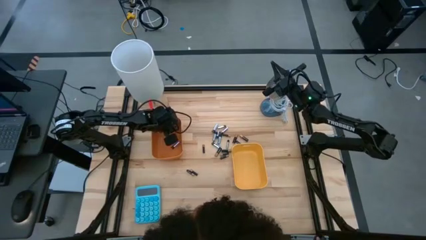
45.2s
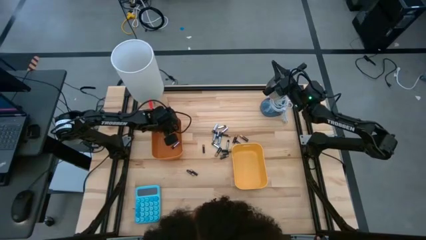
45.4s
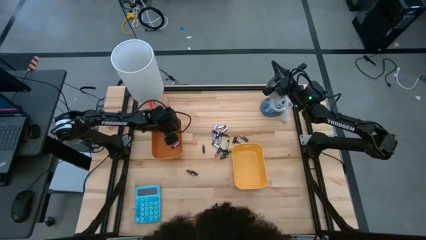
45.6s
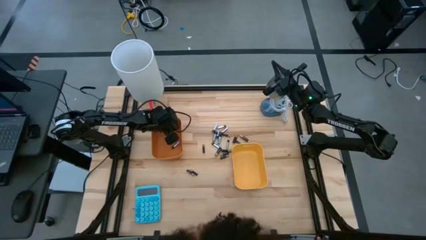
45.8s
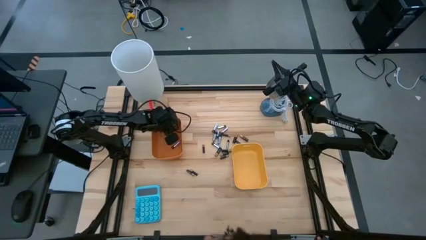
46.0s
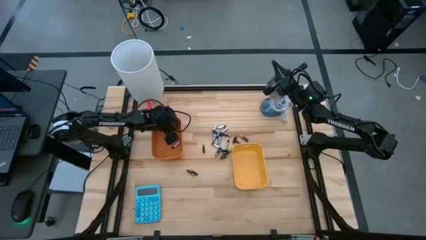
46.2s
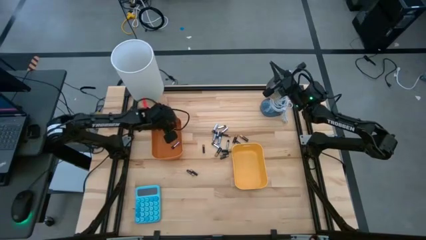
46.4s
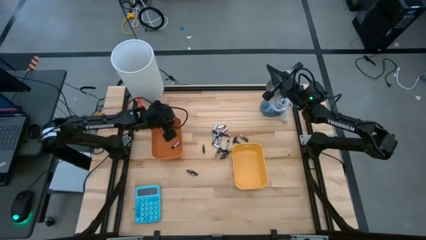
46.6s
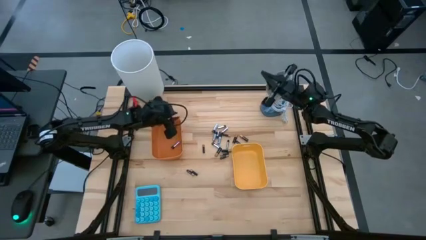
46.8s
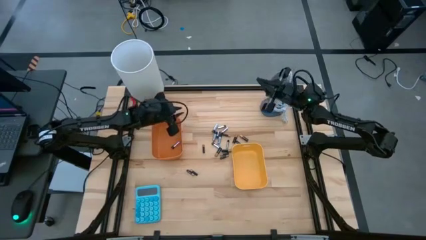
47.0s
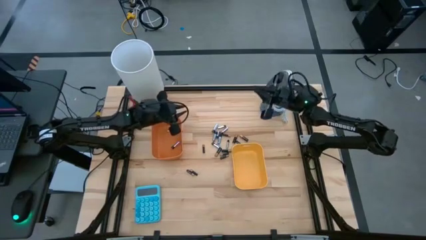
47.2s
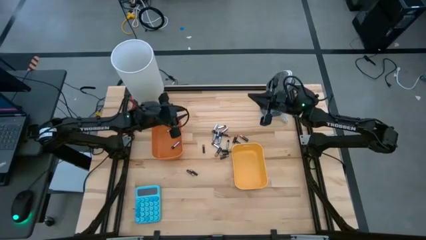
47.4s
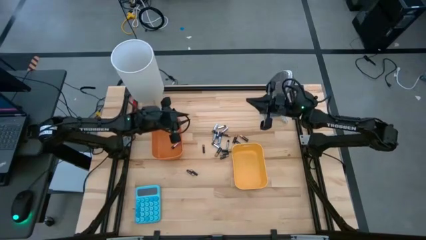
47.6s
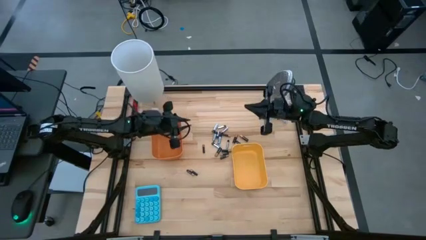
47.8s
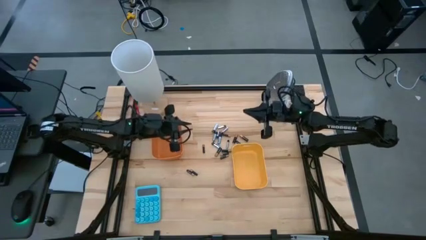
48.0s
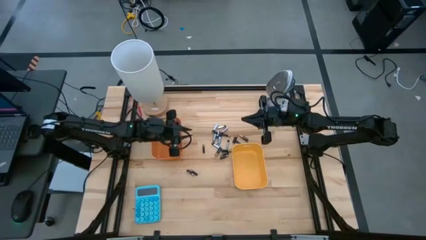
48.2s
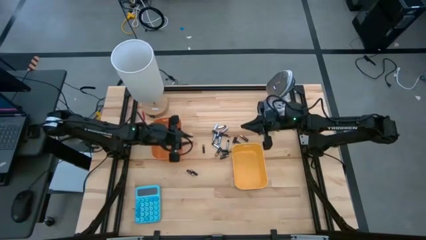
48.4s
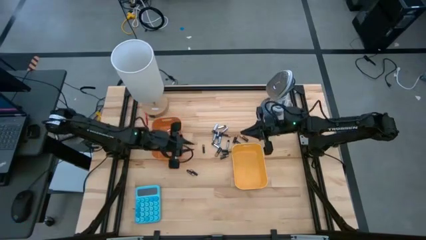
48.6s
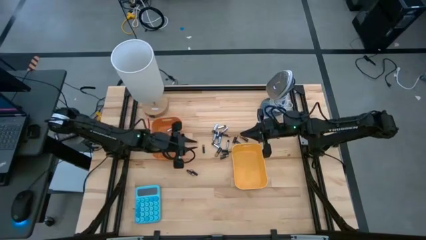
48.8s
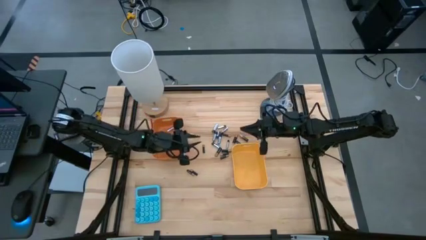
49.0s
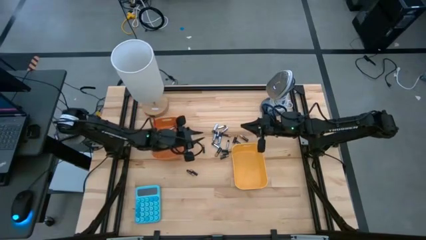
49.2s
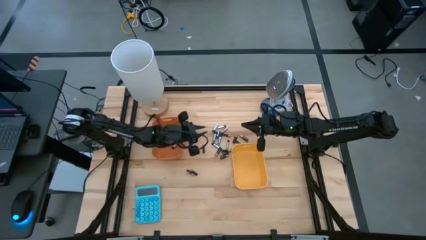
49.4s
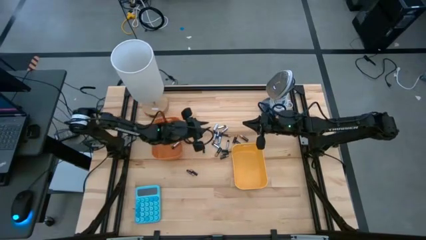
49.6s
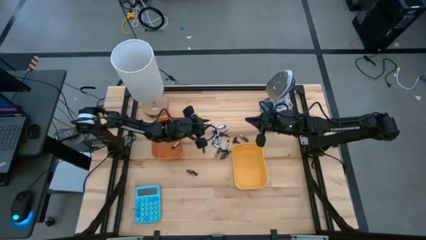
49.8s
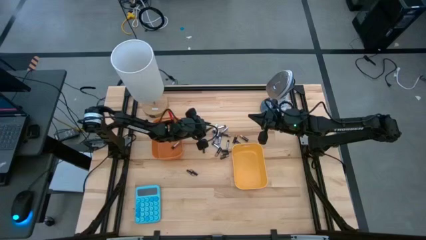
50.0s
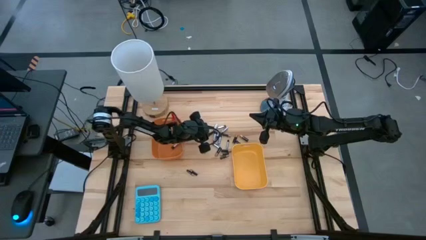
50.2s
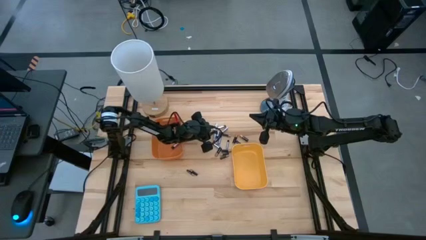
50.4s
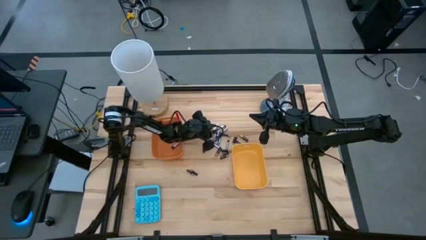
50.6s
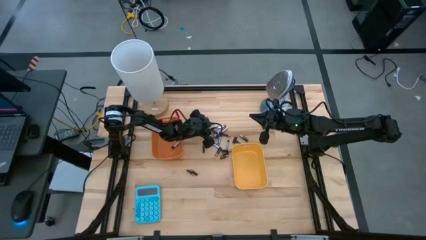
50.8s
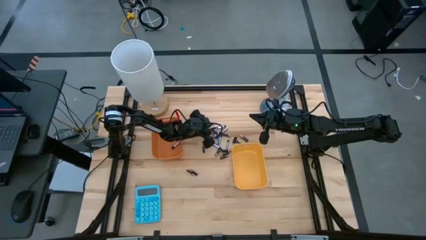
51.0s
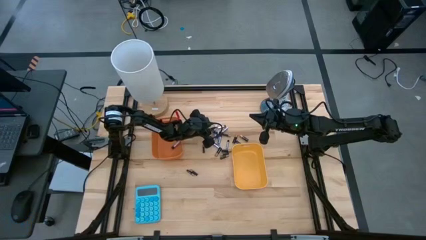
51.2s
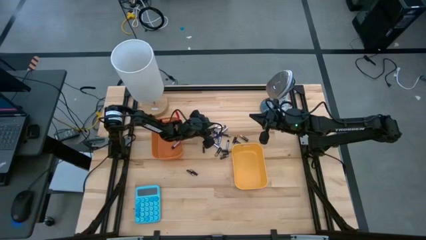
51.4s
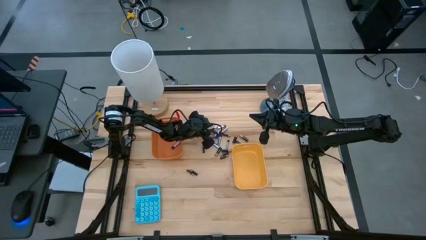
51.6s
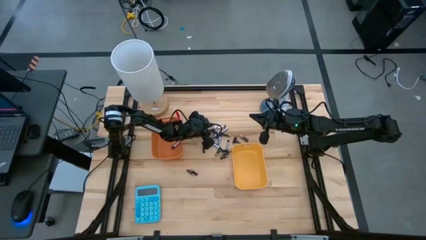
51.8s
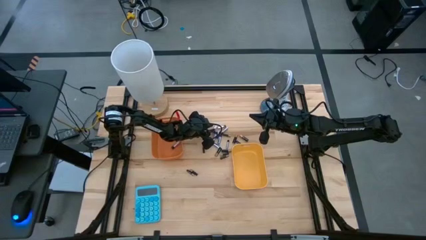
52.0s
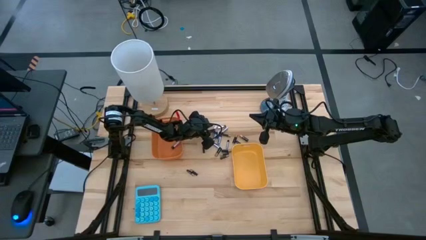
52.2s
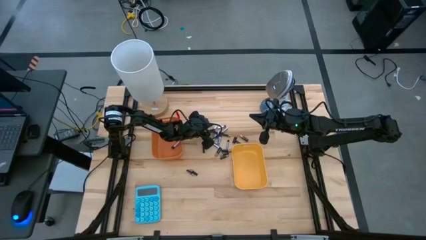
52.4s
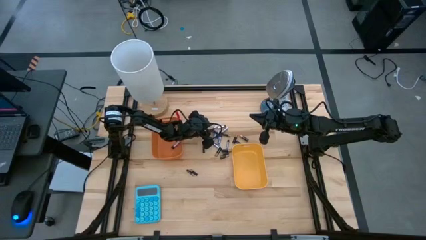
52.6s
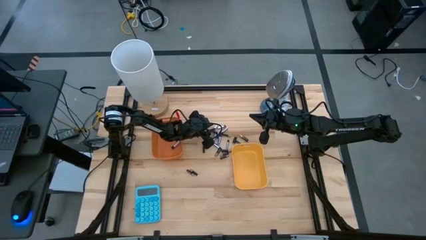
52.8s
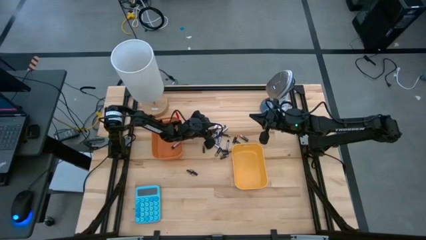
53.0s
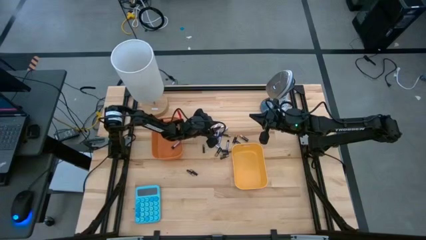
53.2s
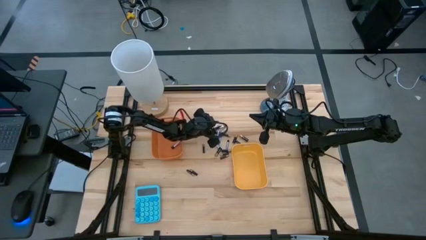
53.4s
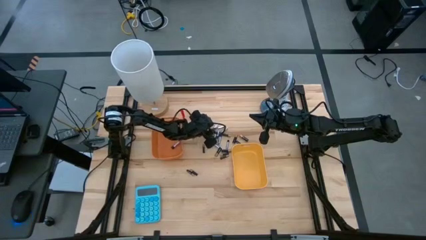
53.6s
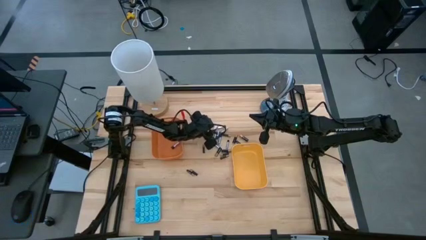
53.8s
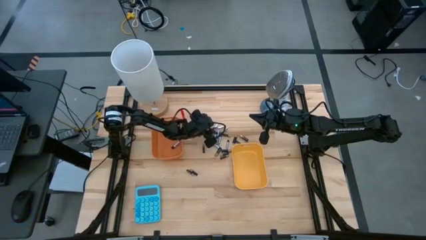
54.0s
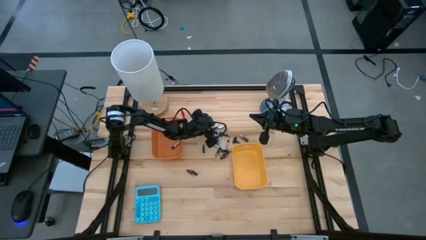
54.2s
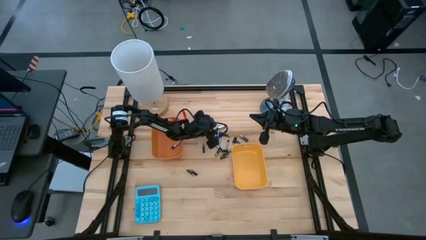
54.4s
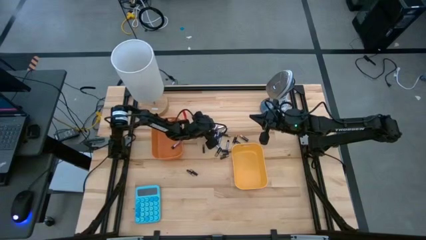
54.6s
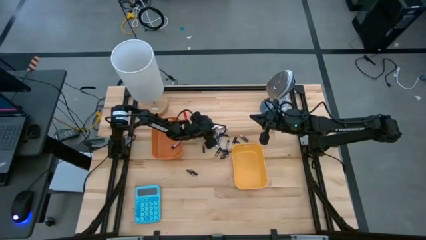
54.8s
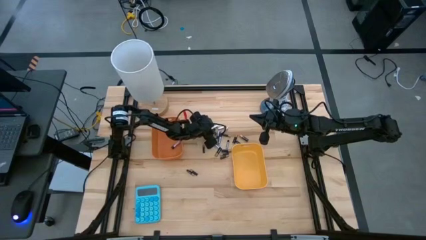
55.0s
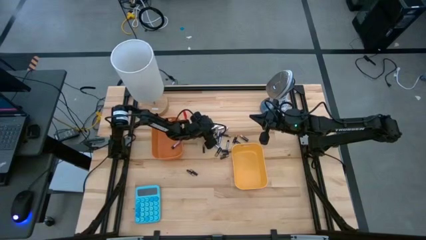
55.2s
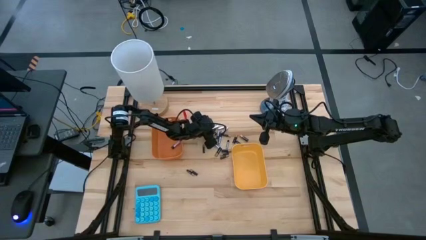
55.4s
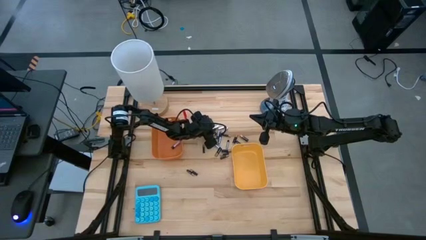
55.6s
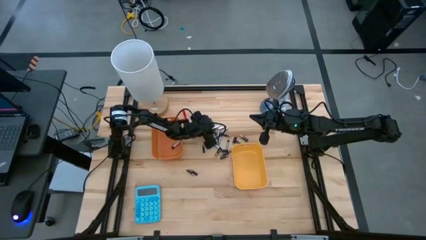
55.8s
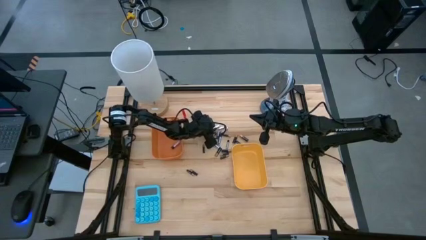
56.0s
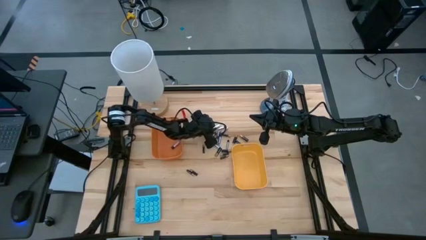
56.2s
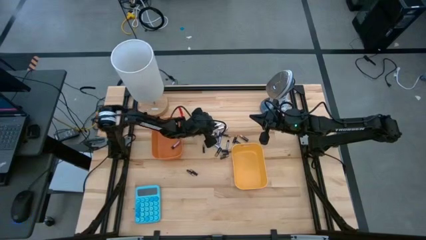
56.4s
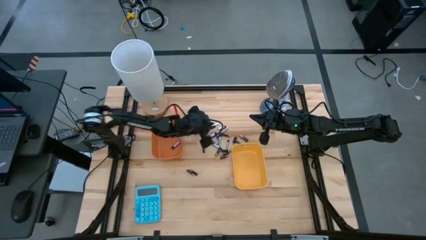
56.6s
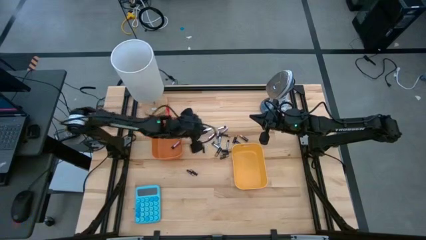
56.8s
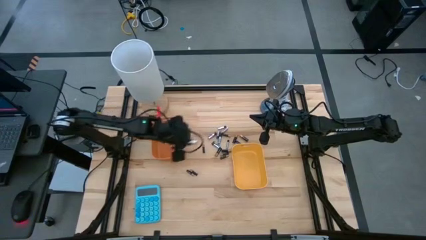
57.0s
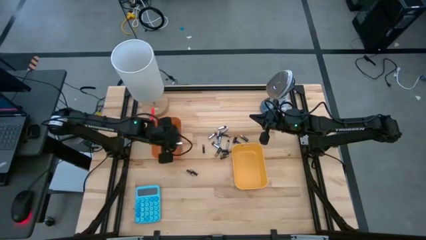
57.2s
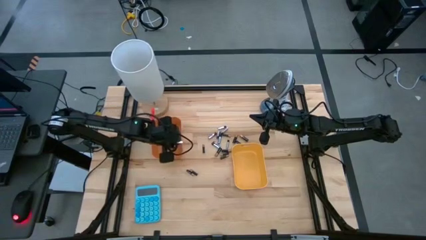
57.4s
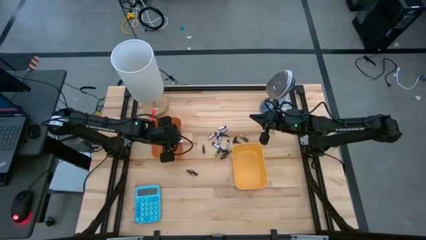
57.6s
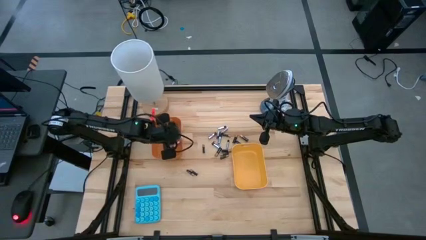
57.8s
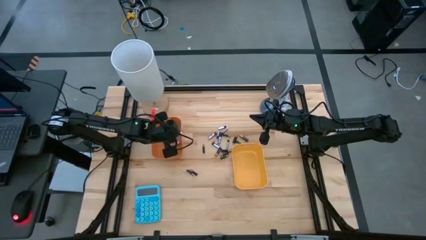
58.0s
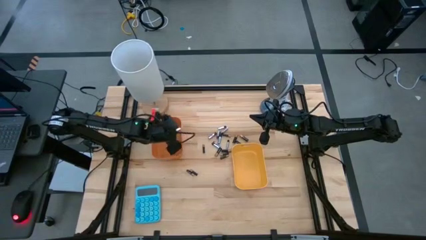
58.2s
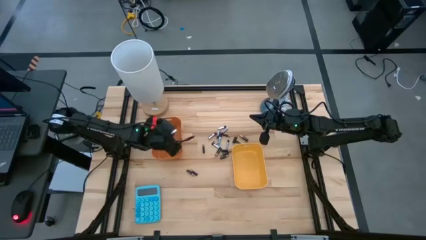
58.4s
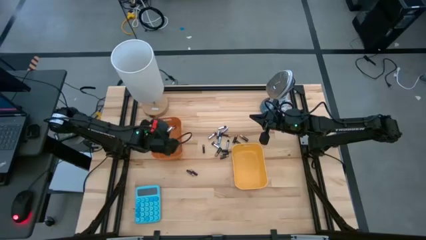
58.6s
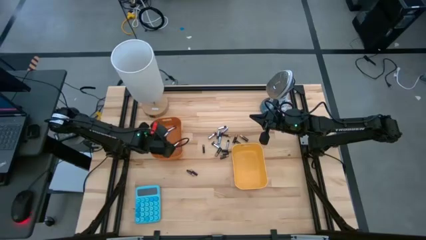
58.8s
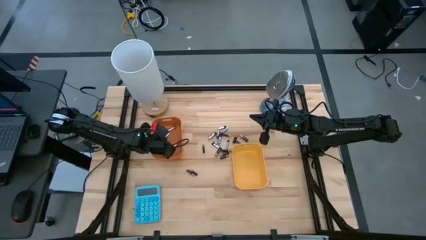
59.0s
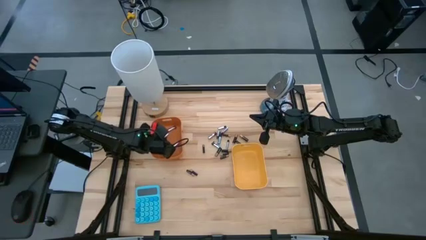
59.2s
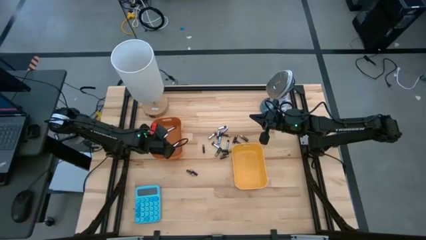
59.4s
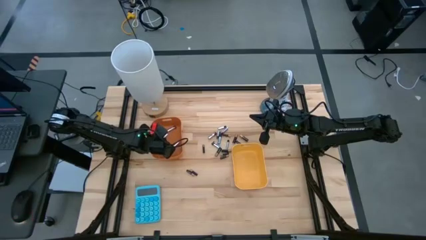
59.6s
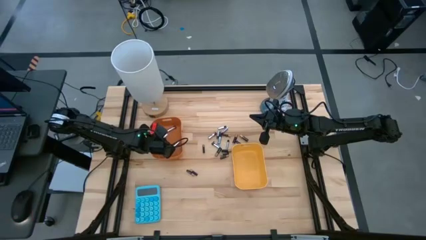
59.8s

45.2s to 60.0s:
Task: Sort batteries
Put the silver battery into the orange bin

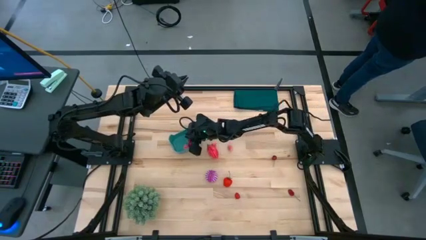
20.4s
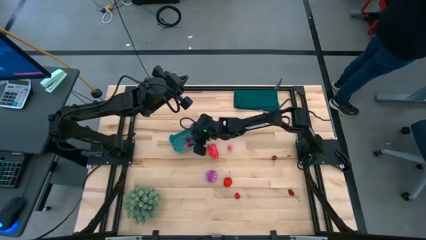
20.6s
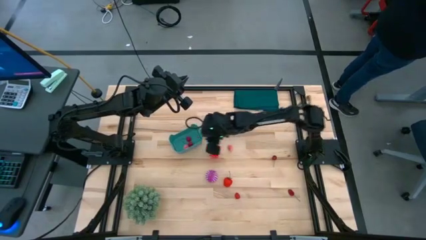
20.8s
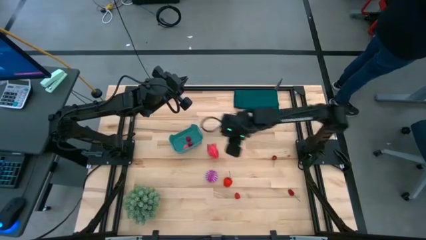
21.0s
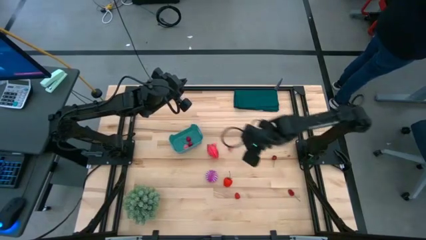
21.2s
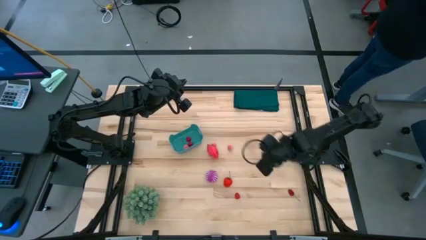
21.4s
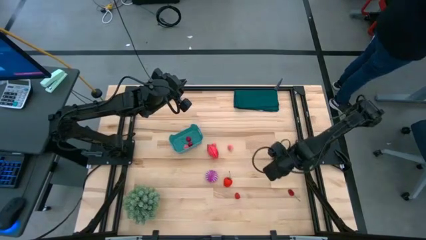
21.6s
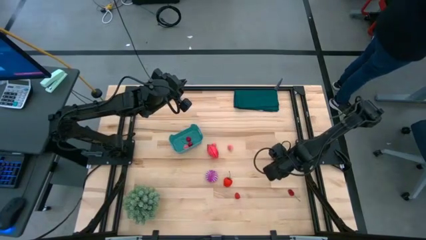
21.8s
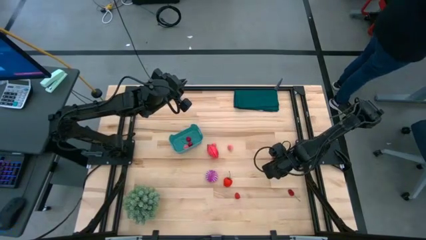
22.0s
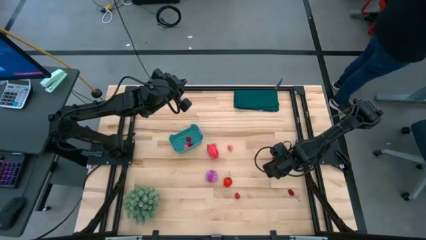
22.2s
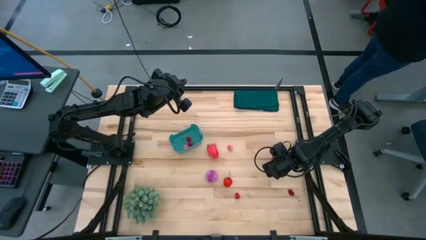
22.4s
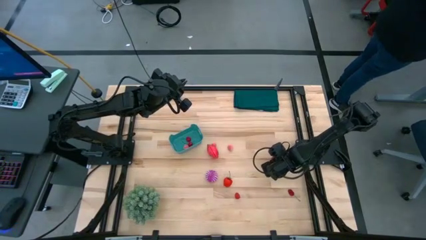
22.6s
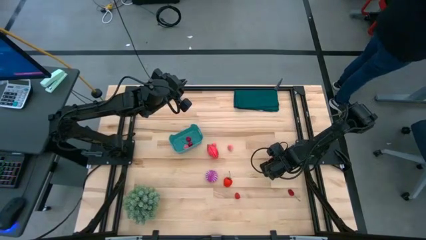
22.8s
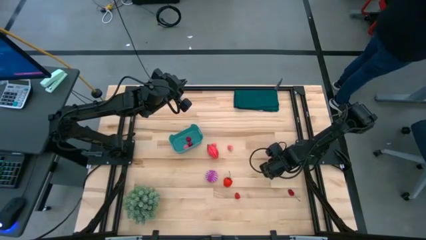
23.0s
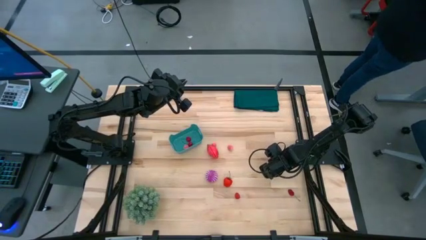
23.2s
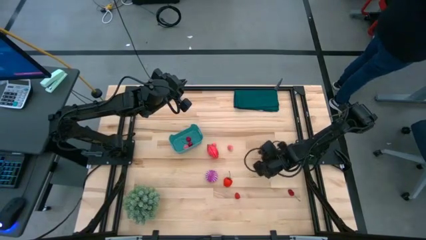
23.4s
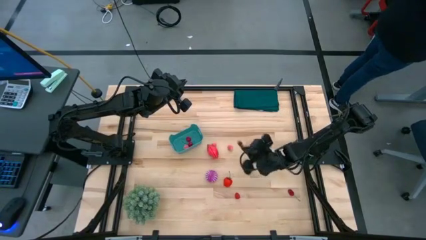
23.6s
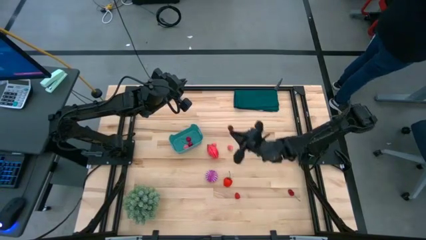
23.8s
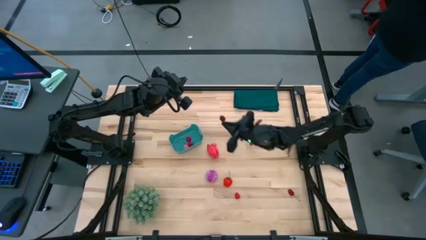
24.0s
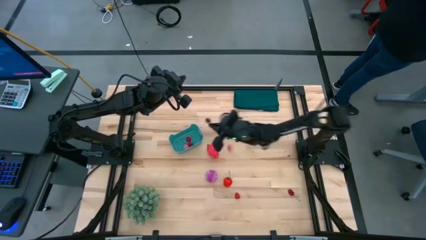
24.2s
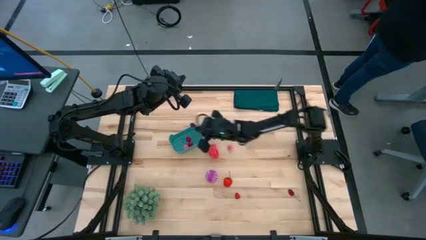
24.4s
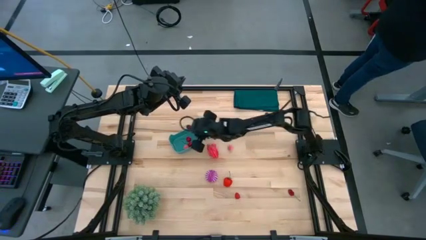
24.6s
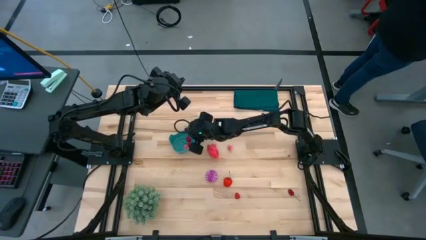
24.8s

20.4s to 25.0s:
Task: Pick and placing Produce into tupperware
Put the red cherry into the blue bin
